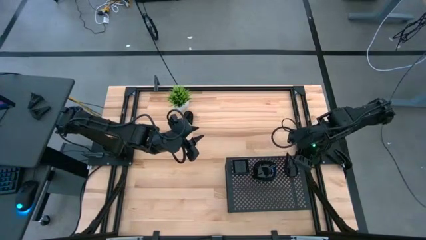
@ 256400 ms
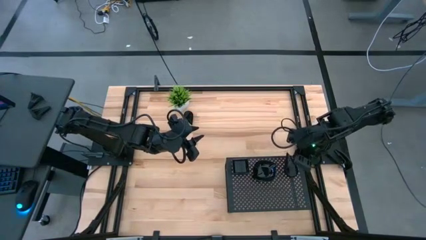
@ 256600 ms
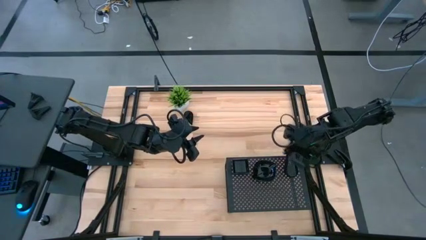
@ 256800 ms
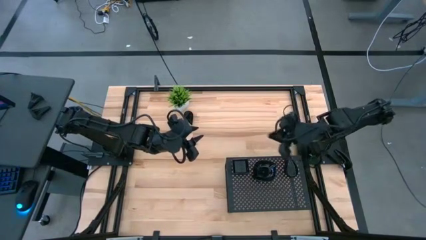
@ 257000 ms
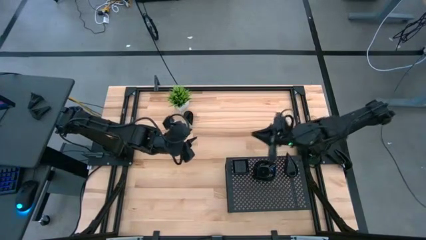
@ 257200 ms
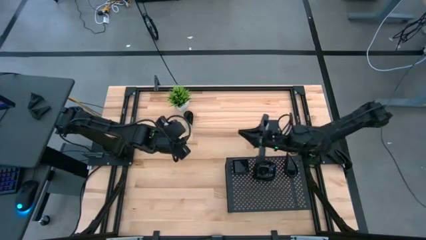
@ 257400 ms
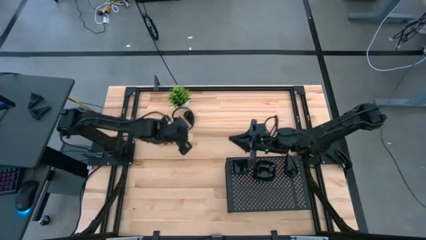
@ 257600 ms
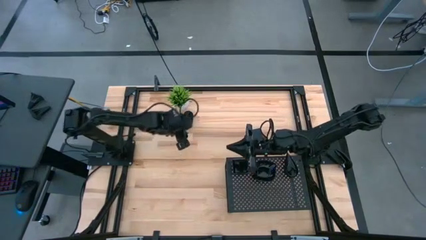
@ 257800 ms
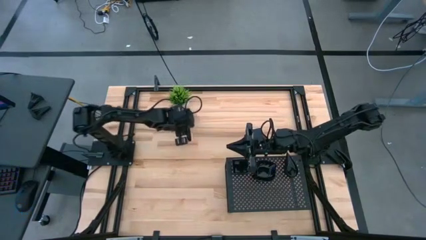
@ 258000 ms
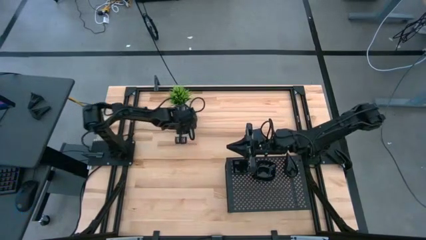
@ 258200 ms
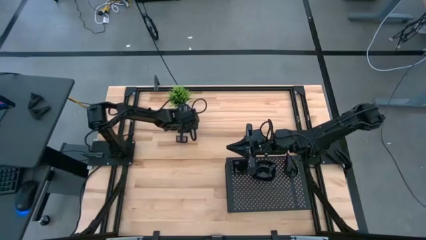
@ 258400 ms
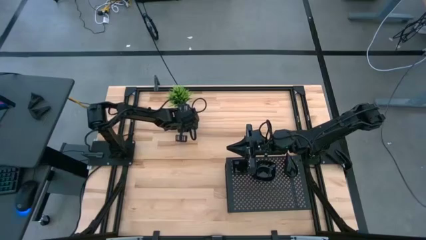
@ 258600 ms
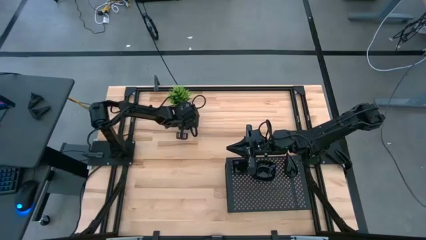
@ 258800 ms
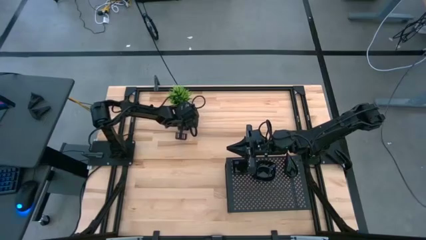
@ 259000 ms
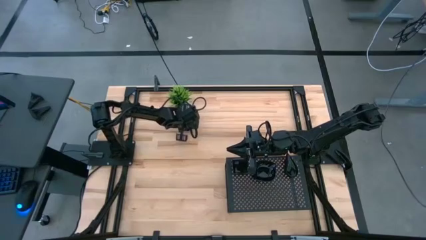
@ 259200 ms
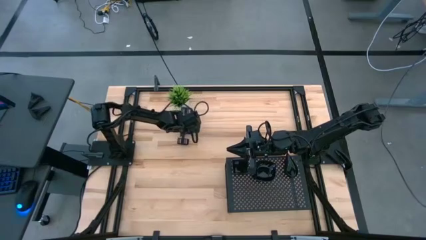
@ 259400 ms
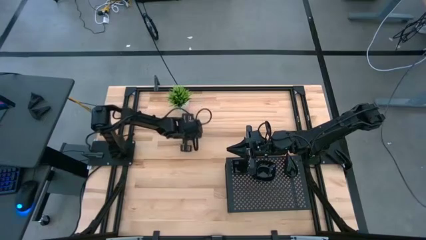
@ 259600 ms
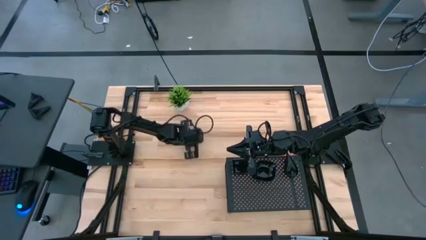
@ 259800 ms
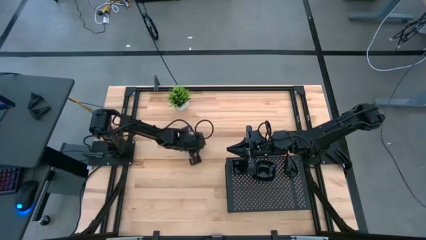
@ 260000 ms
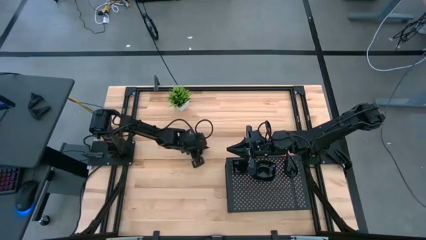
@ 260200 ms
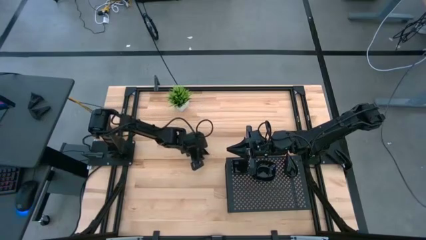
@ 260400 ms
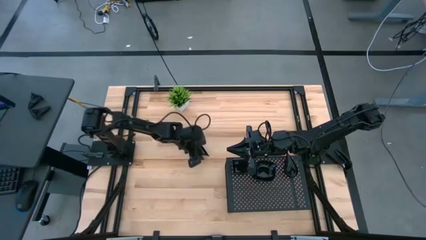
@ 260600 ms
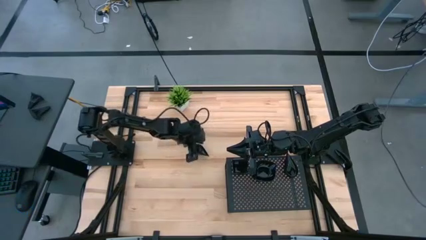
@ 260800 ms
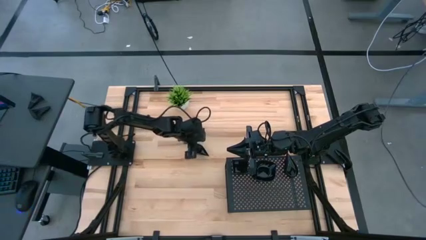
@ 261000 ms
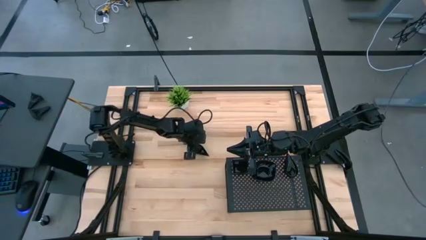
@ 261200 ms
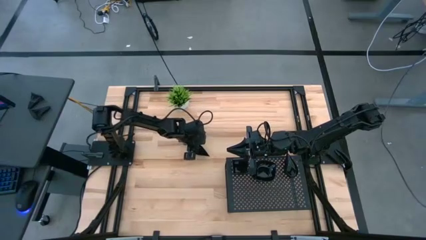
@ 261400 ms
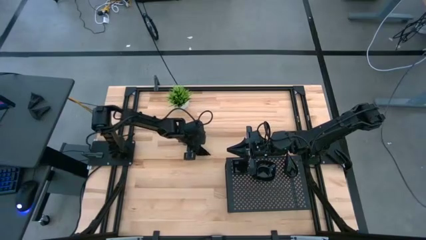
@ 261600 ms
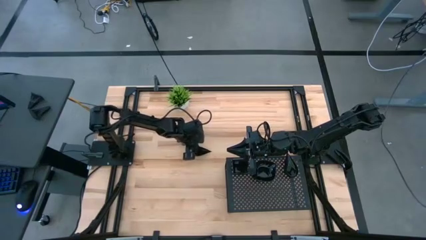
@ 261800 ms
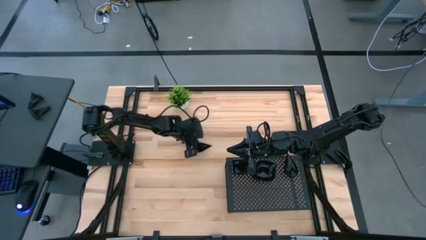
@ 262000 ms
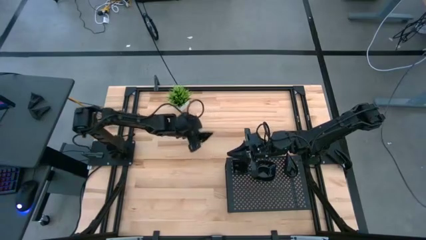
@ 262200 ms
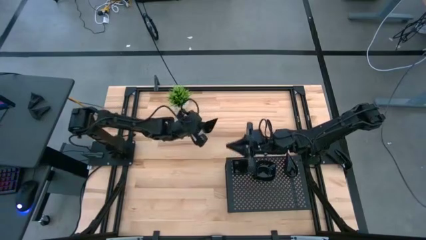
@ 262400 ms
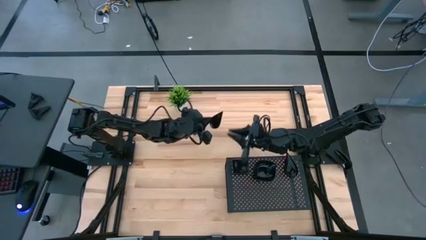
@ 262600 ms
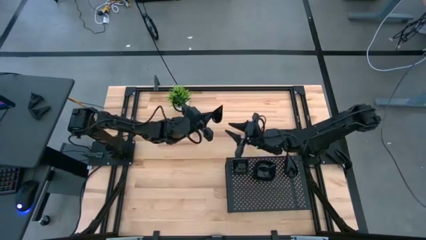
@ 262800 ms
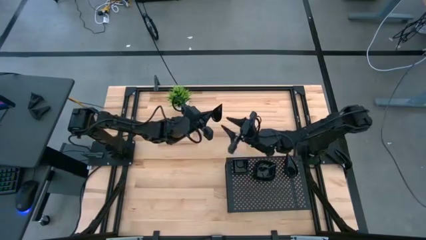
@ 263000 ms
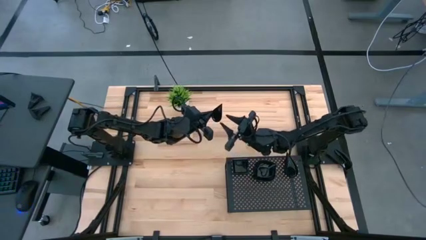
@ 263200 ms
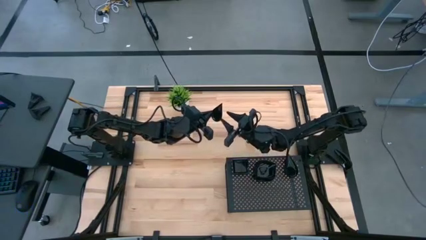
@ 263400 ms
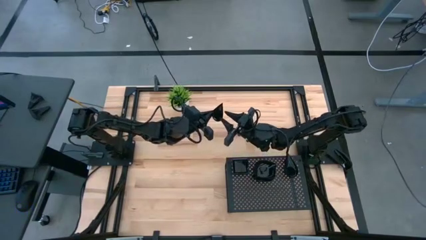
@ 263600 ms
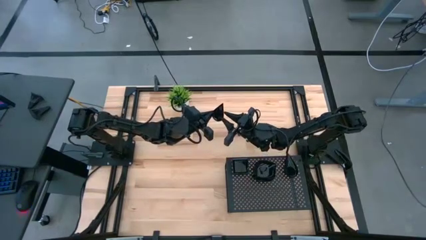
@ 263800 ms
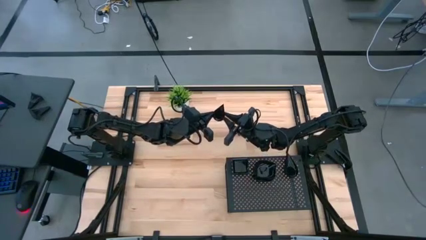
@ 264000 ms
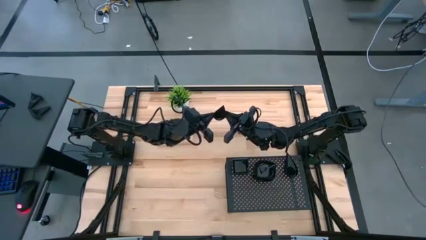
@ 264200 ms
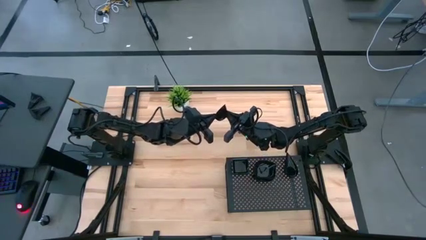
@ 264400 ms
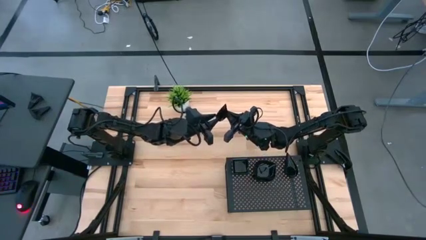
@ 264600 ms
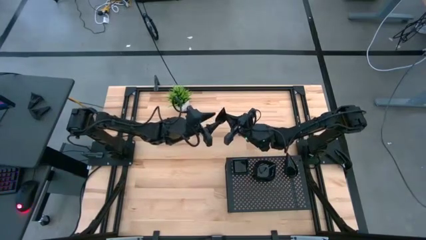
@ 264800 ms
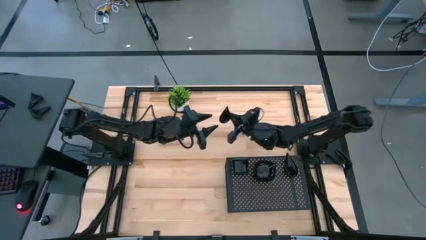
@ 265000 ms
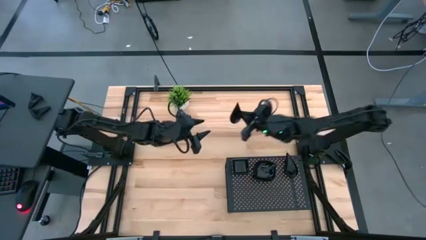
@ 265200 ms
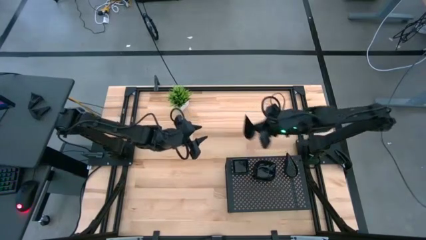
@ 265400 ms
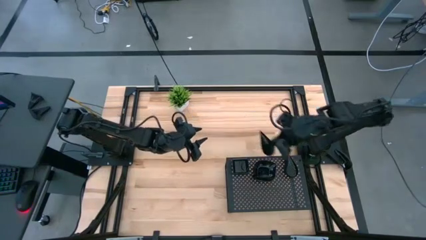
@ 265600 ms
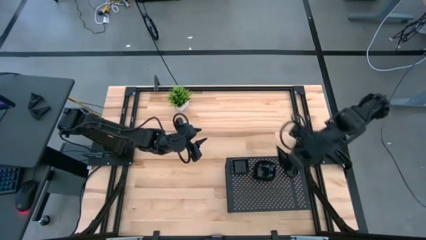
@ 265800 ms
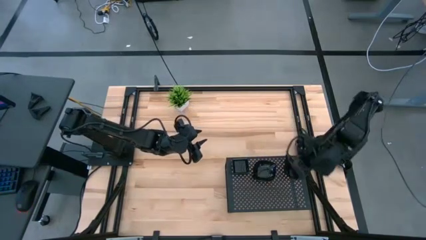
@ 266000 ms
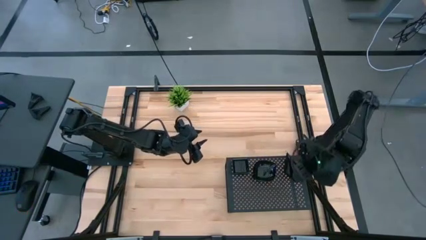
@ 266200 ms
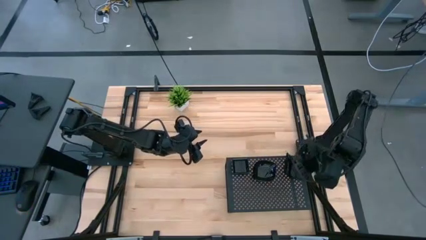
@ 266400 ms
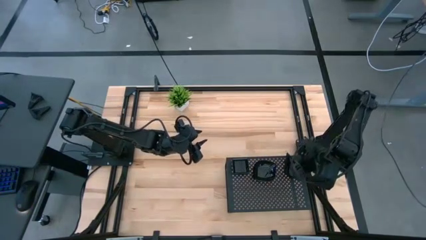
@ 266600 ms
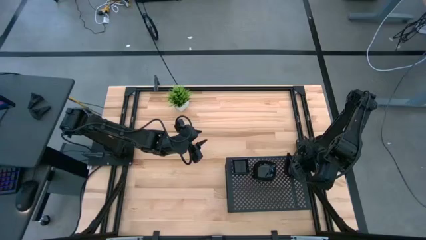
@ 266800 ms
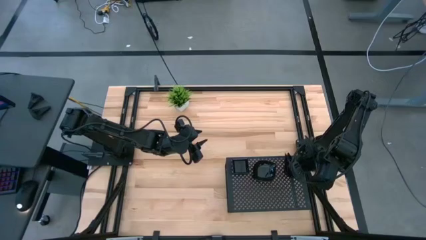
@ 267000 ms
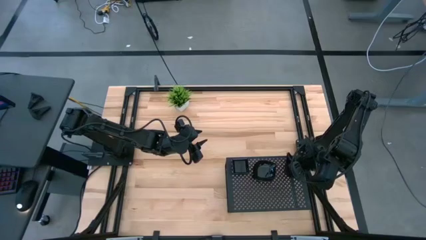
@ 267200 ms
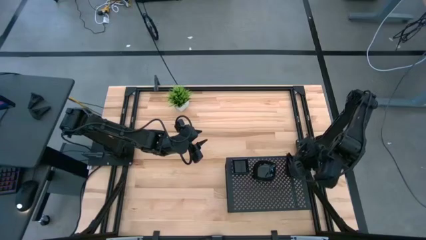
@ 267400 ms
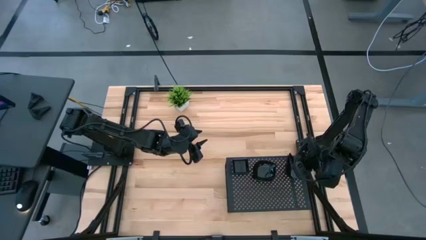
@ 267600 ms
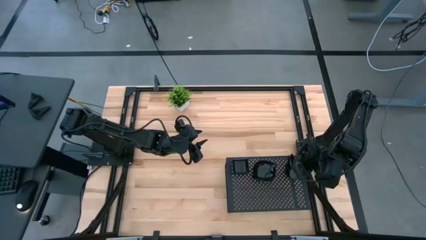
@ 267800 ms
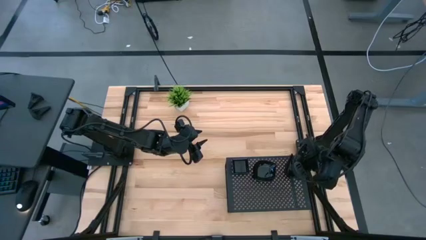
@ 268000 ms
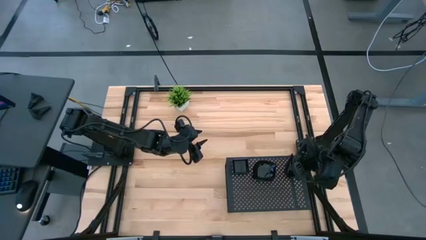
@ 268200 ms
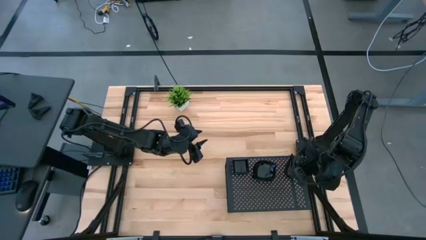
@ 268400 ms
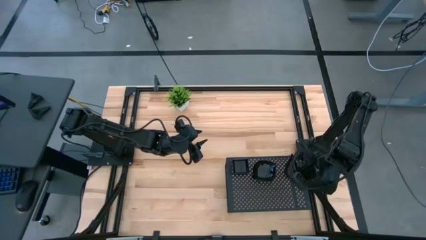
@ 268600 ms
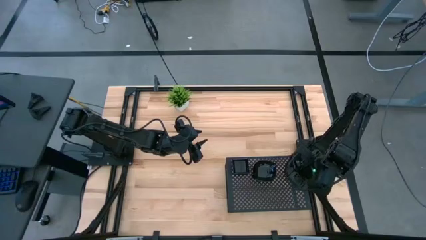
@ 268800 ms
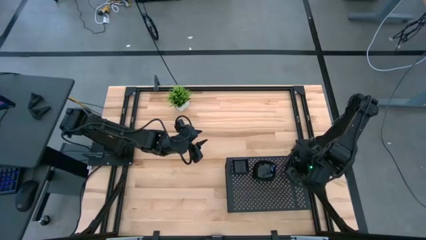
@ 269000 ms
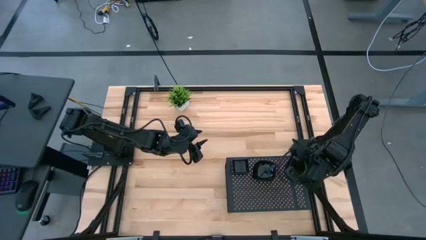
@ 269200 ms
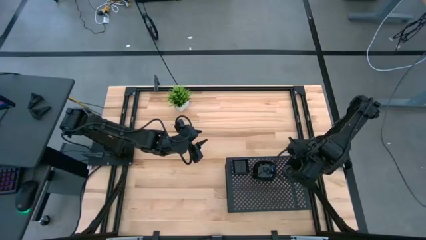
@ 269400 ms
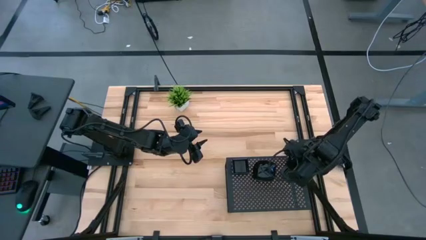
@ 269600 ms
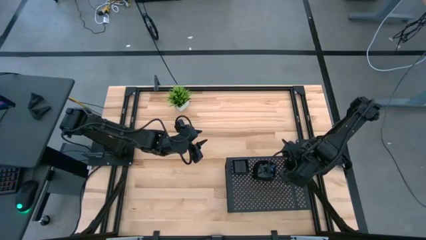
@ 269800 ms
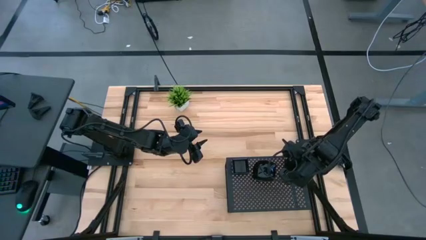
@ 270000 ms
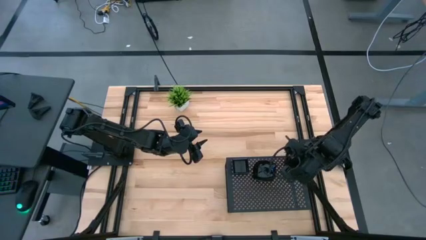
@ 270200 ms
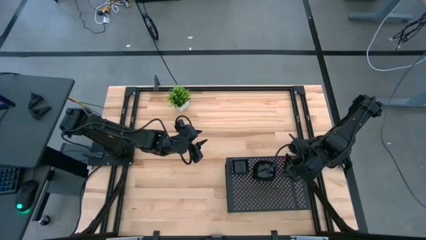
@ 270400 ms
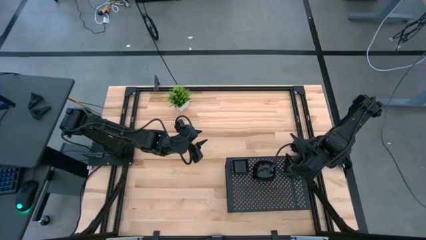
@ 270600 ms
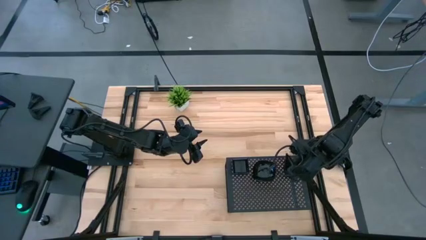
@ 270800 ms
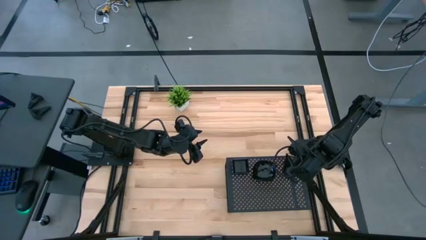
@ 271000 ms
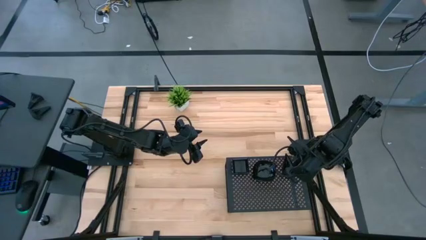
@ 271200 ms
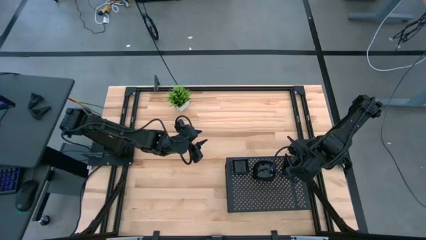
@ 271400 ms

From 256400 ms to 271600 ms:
Task: Pick & Place Mini shaped plates
Stack the drop shaped plate on top of the drop shaped plate on the shelf
